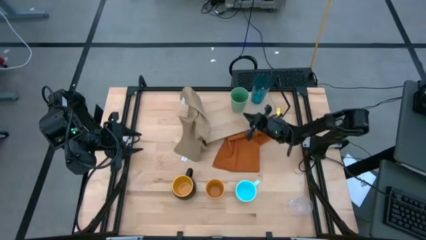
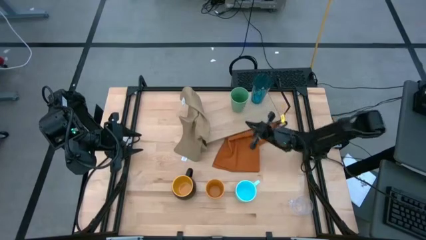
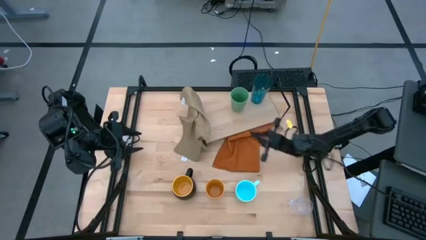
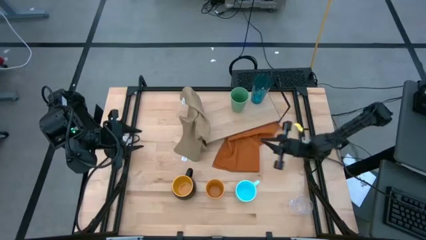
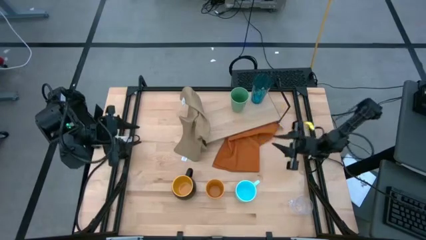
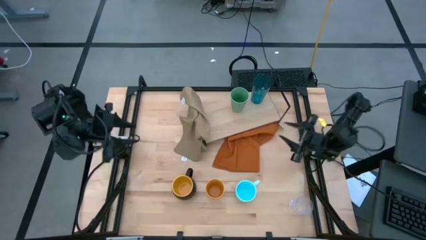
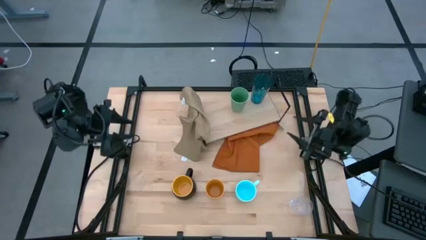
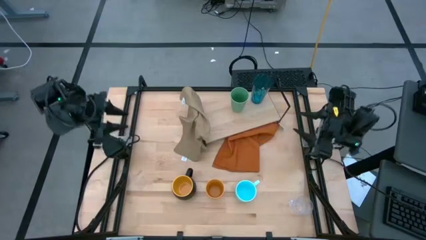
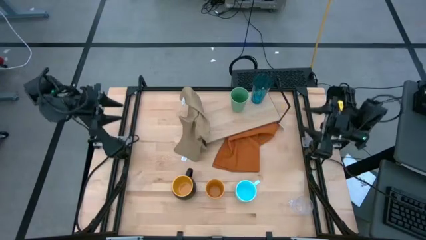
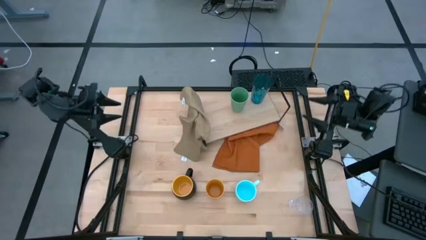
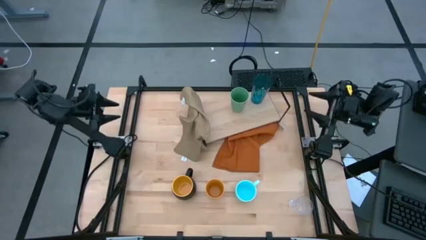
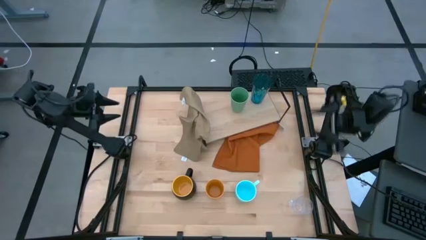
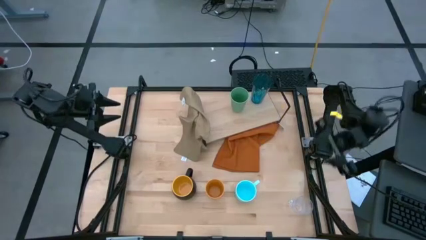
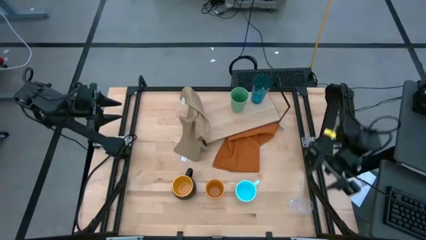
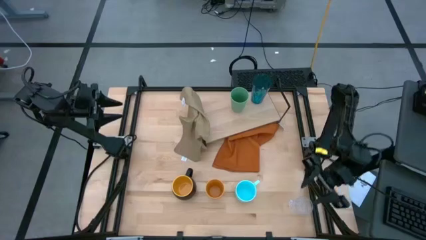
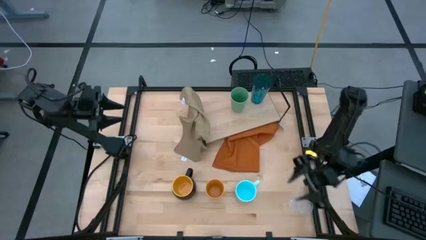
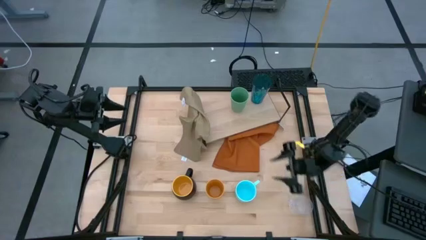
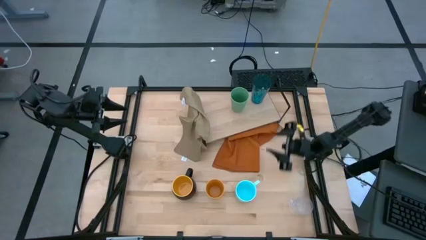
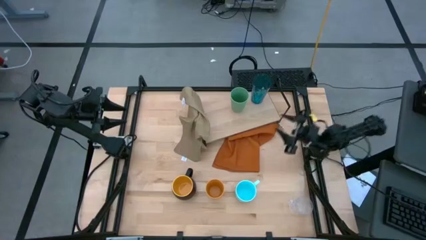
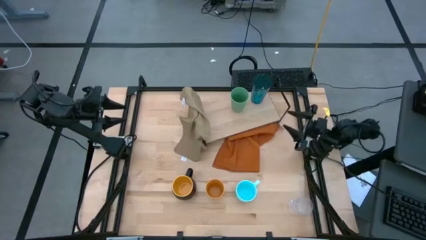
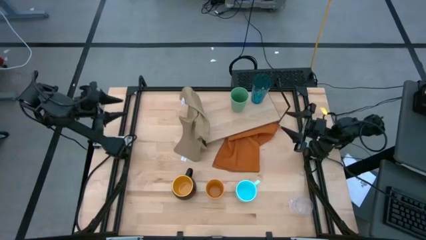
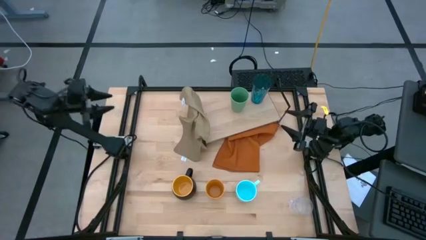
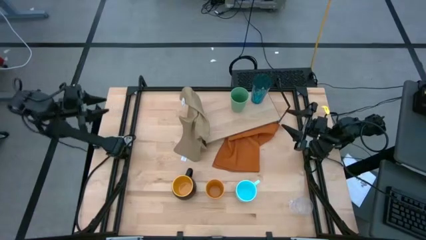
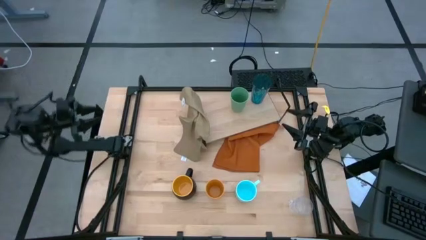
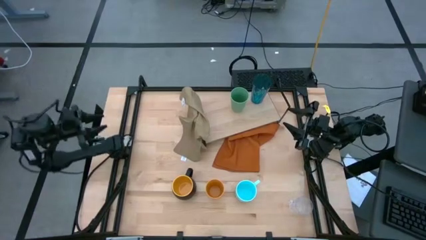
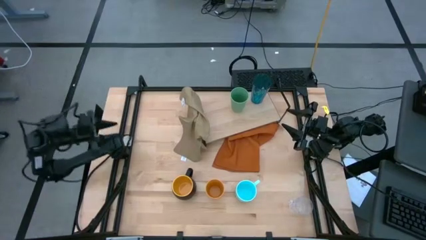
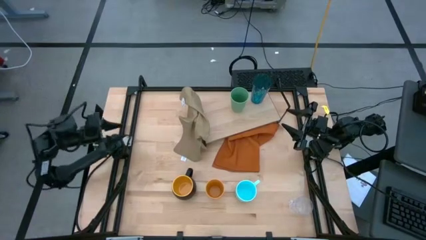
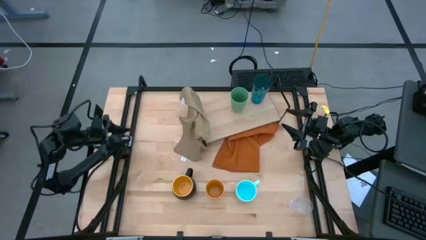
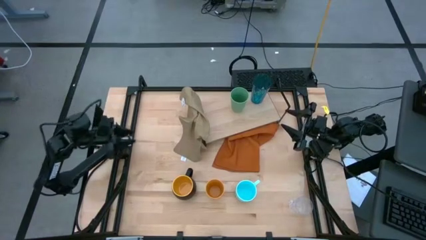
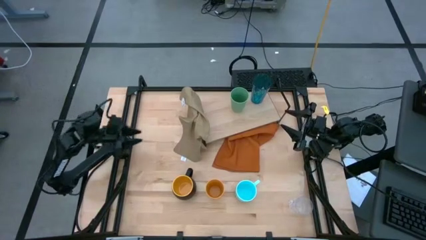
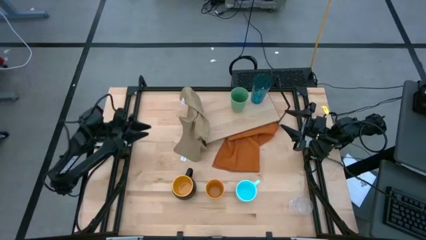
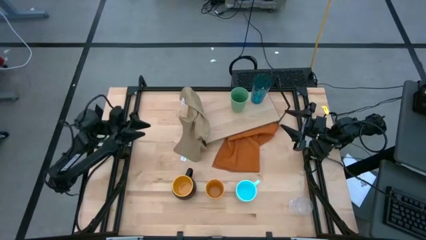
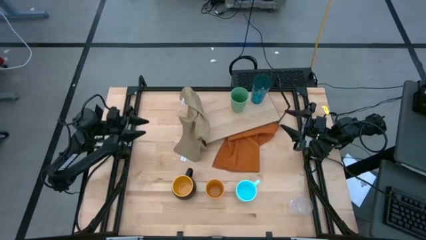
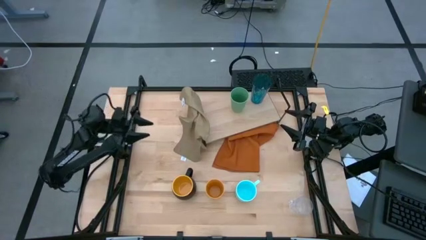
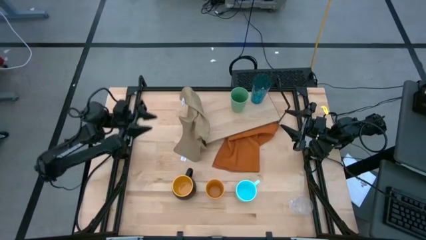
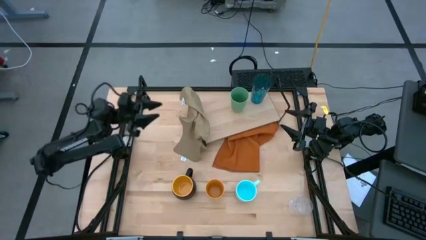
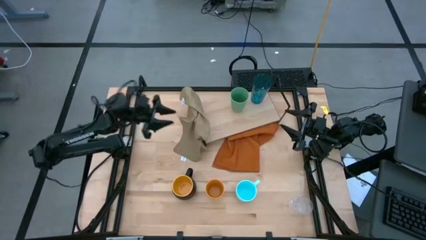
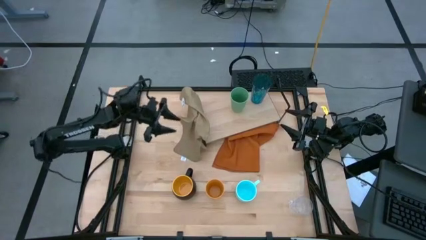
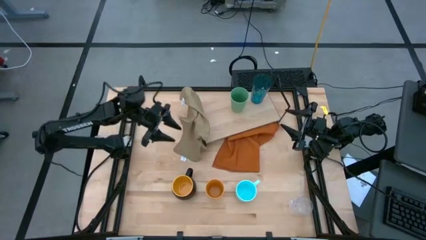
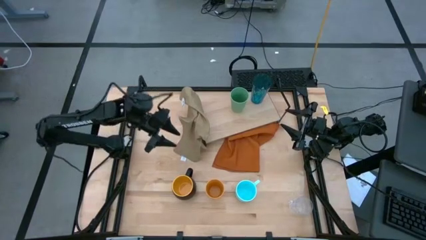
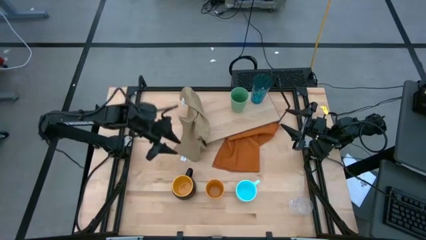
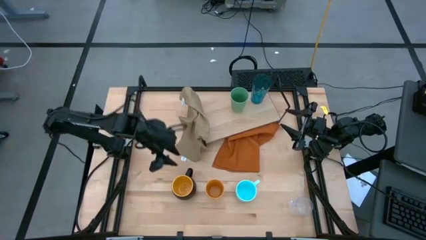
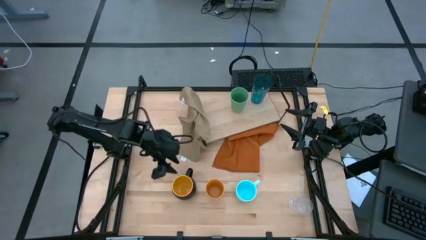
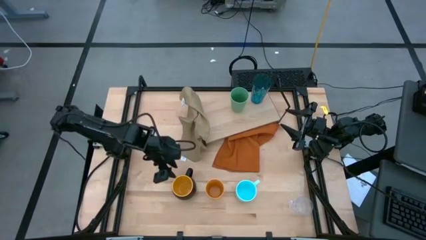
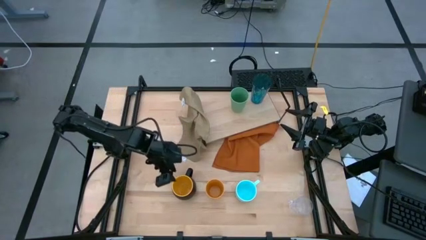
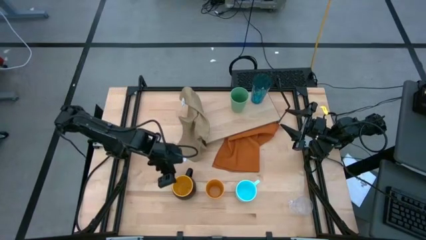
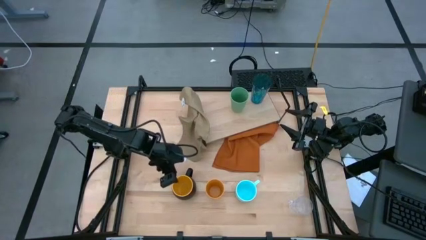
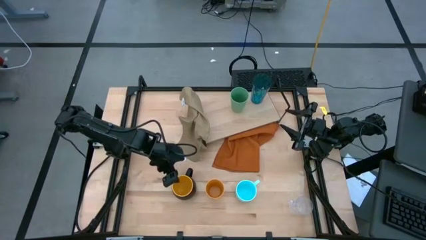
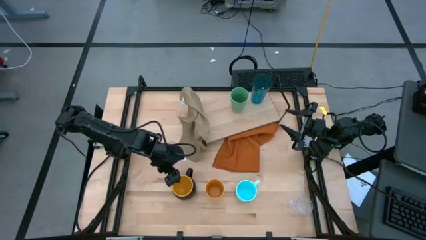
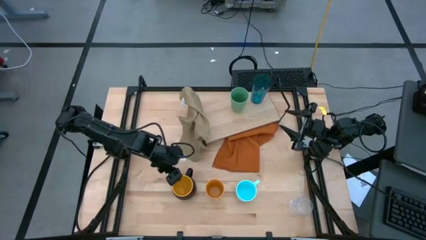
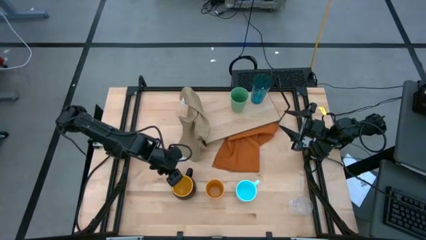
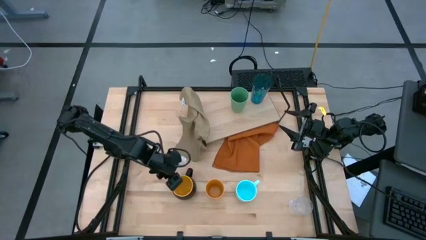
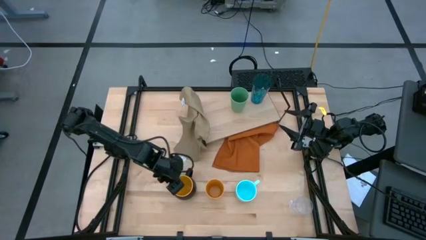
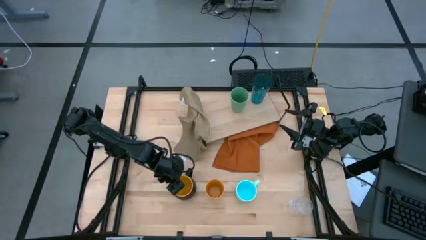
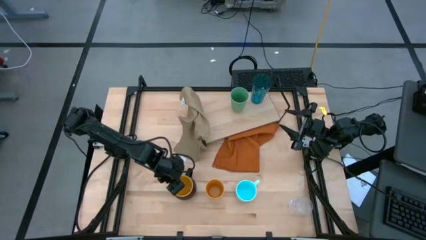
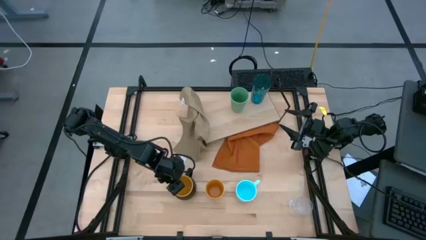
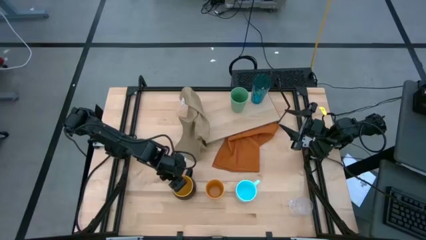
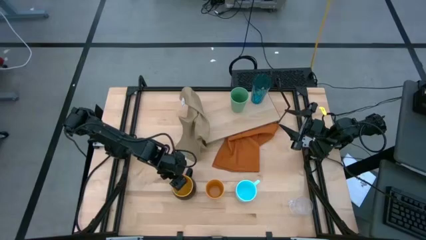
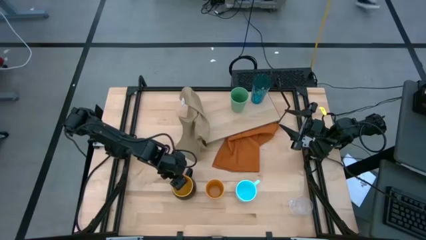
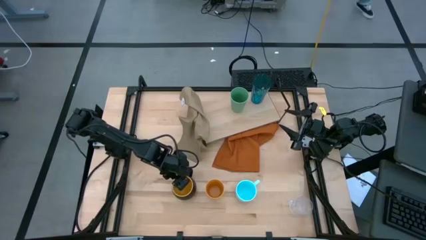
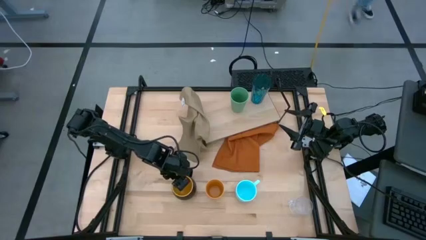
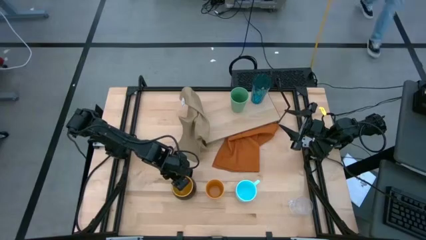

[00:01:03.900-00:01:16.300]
Task: Stack small to large cups/mugs on shelf
Put the black mug on the shelf

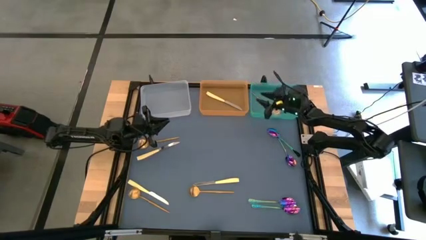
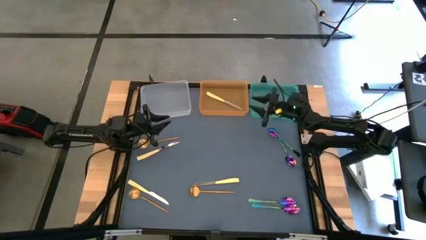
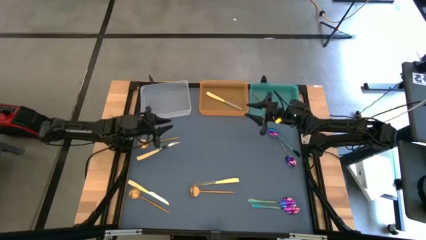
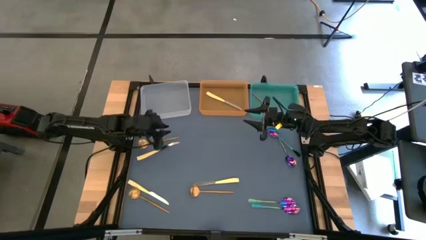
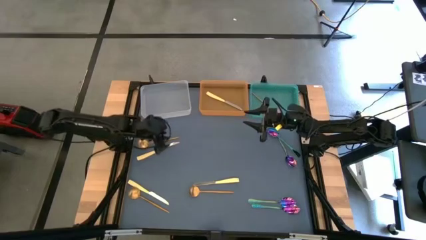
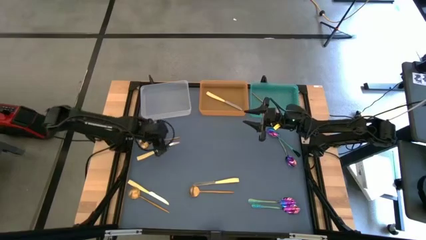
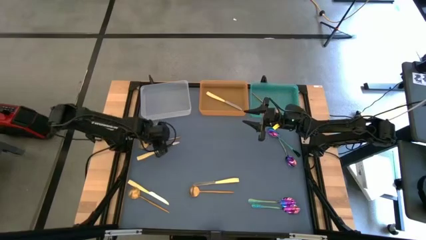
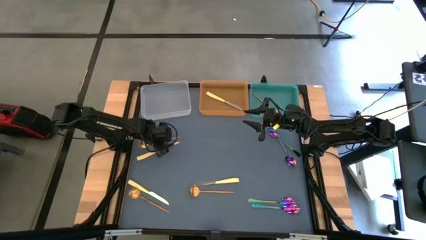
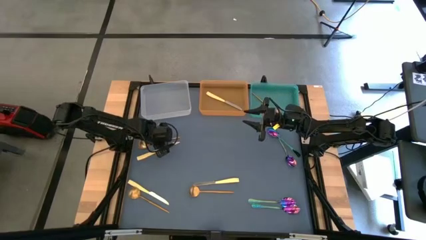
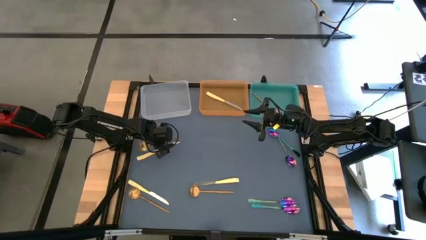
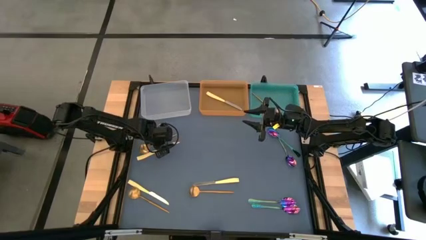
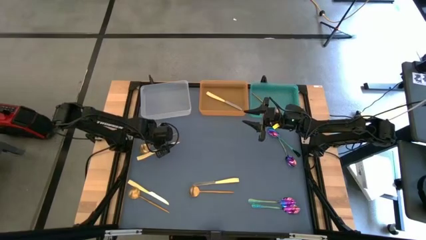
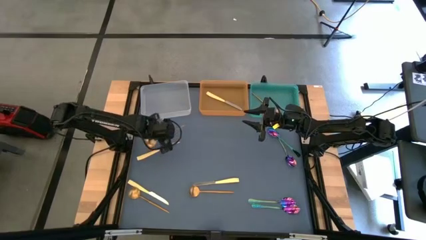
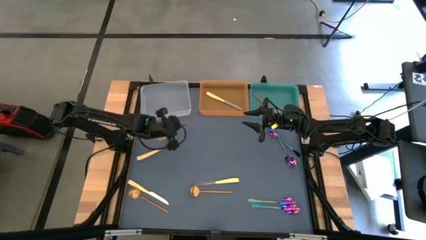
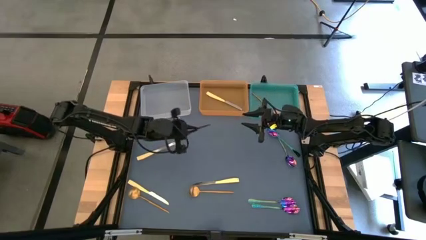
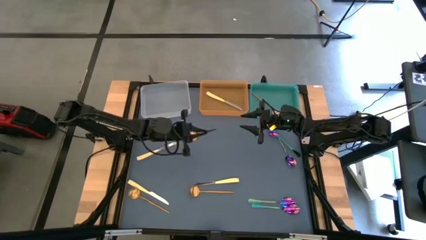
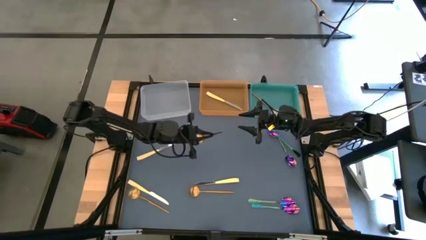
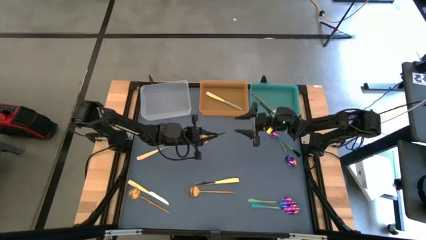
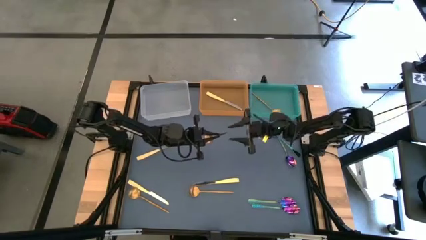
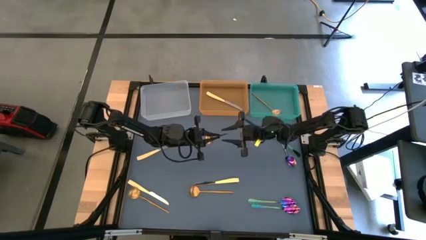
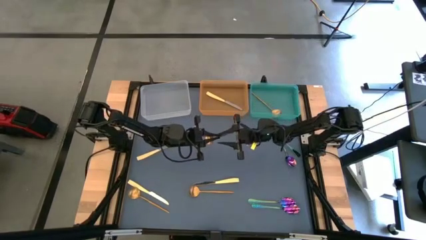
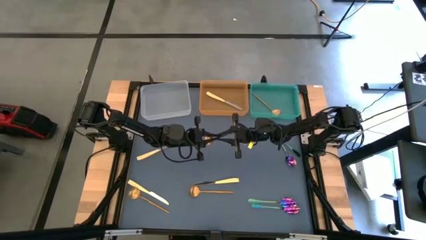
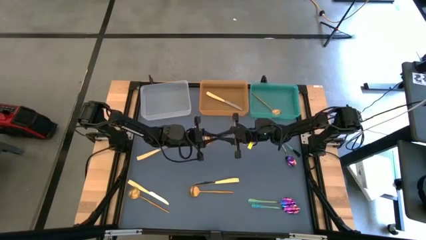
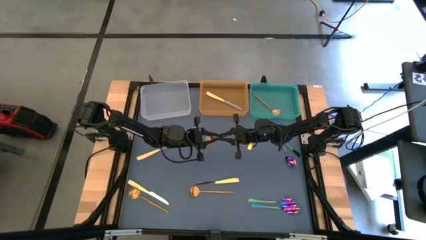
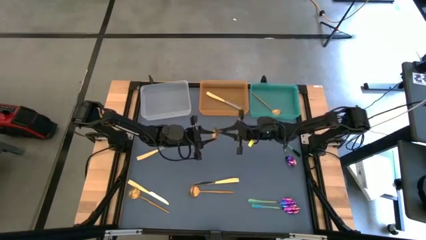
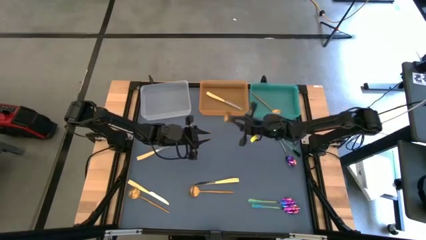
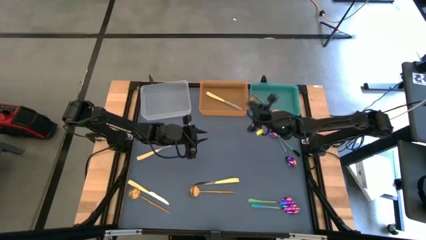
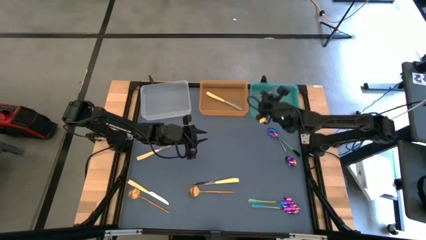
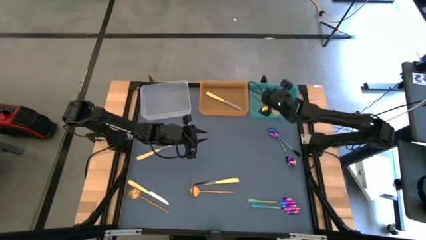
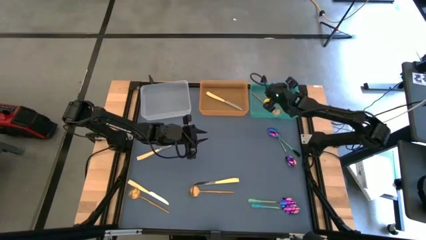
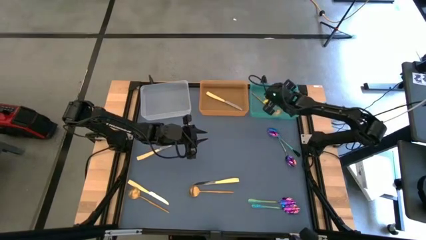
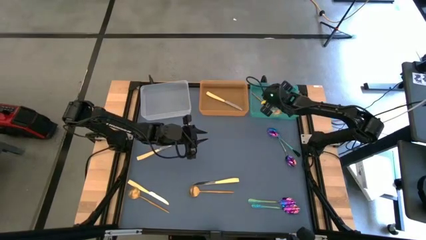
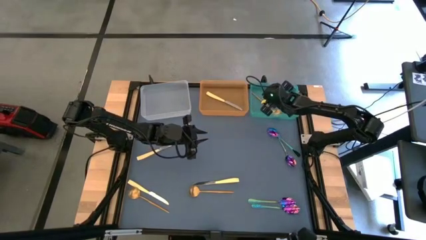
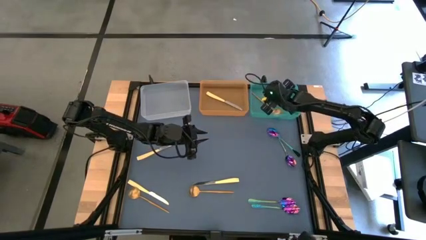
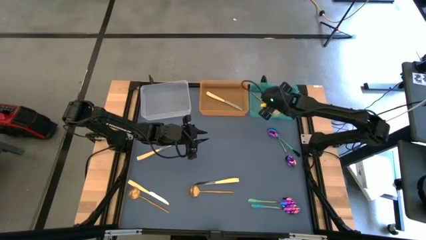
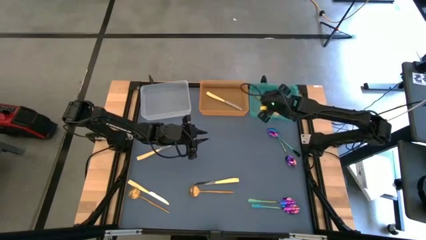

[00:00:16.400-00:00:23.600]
Task: Sort silverware by color (type)
Put the golden spoon into the green bin
